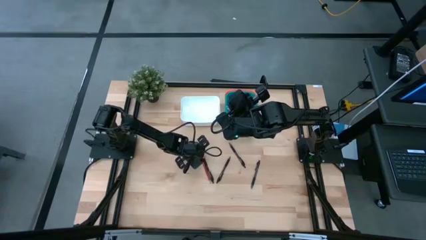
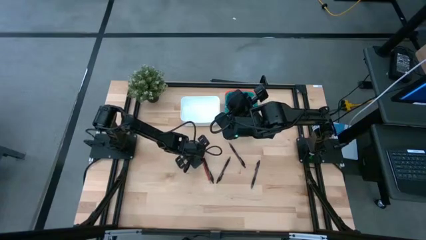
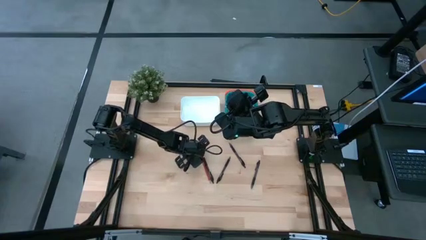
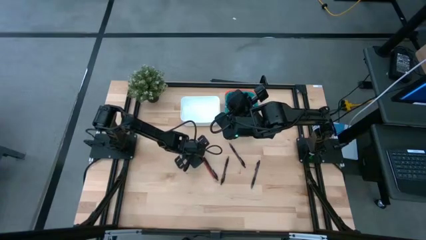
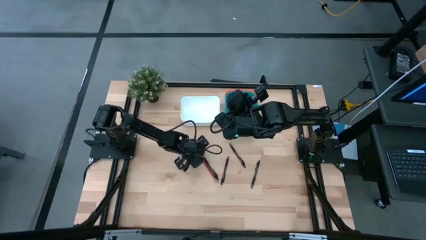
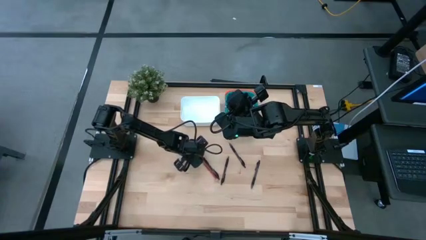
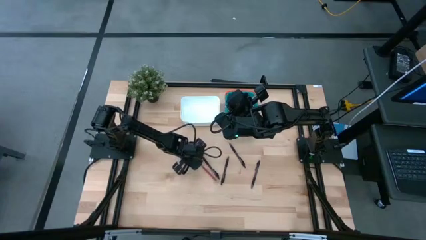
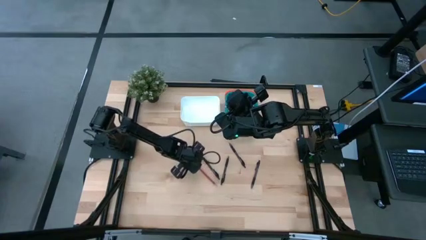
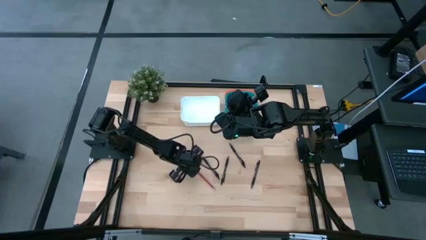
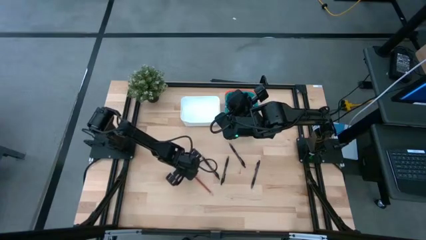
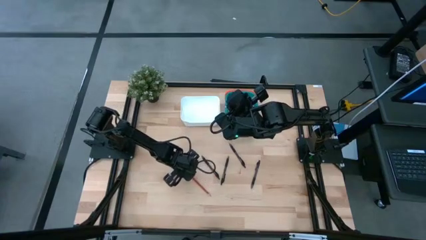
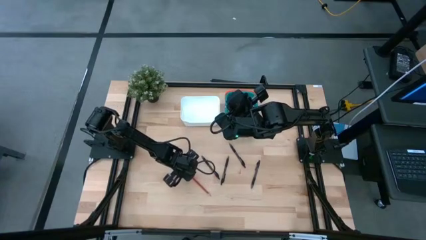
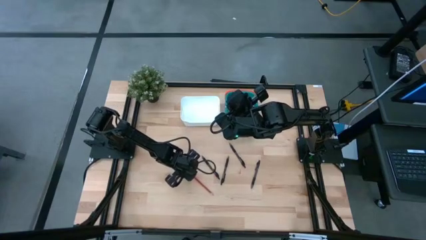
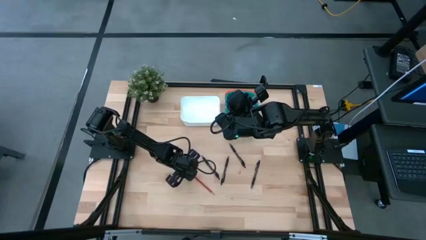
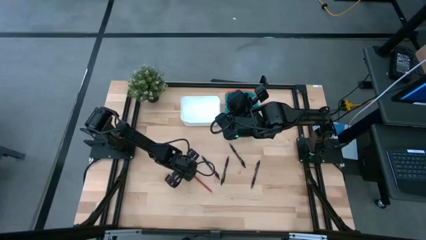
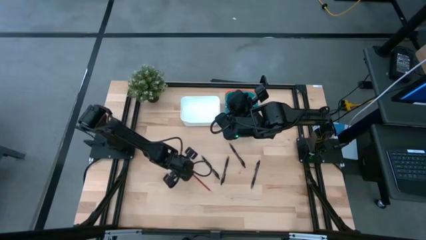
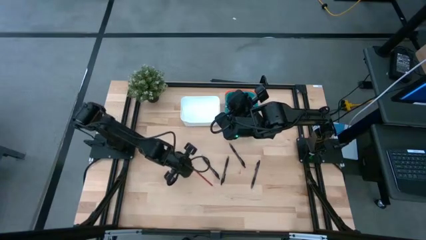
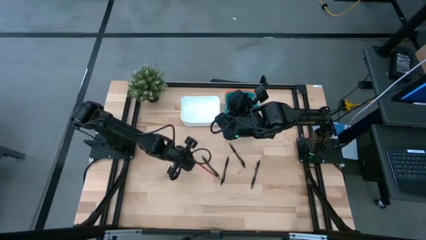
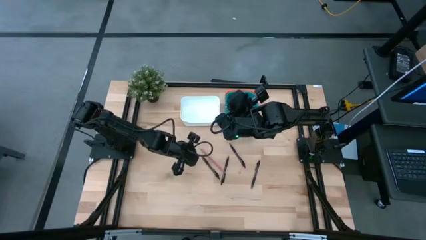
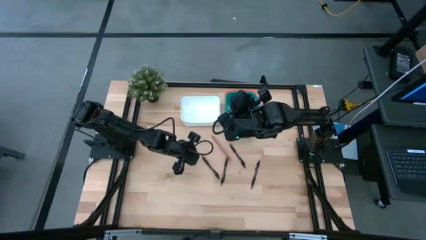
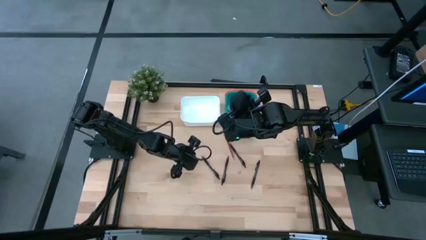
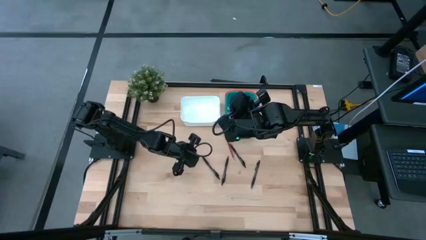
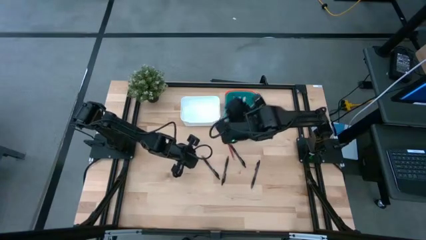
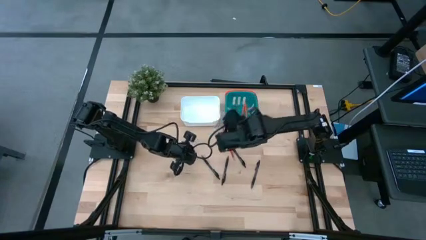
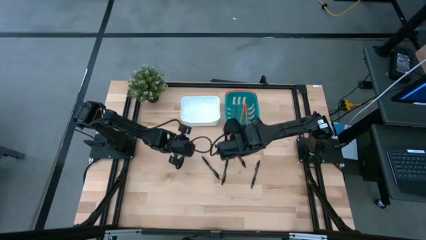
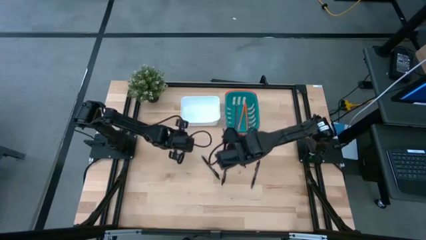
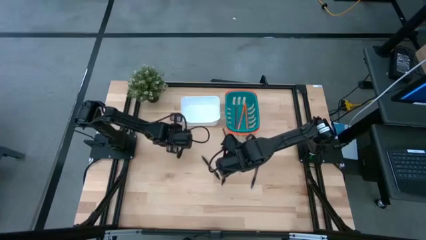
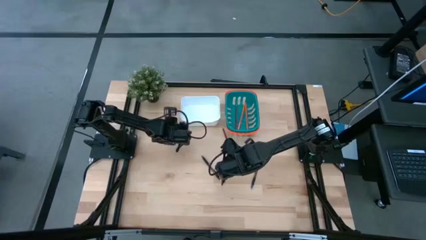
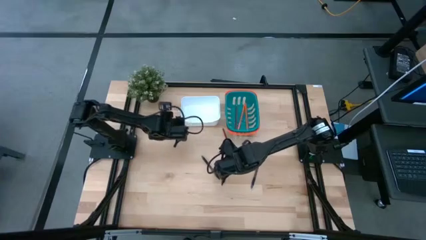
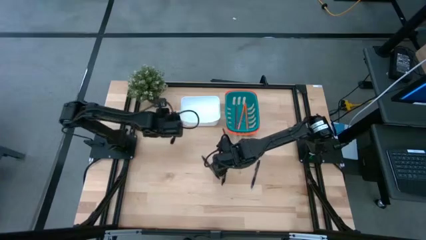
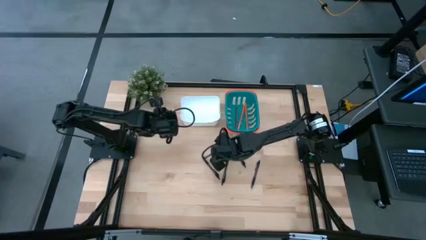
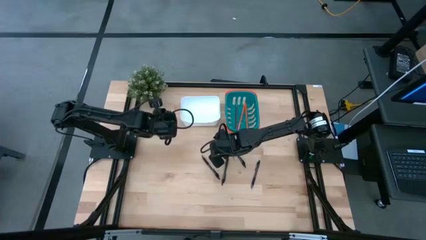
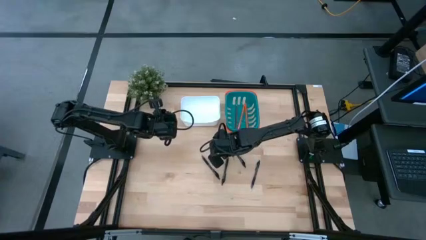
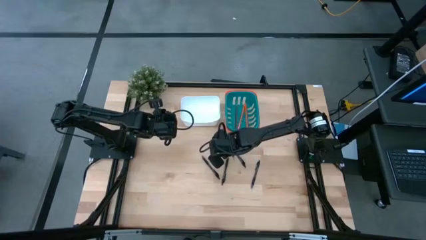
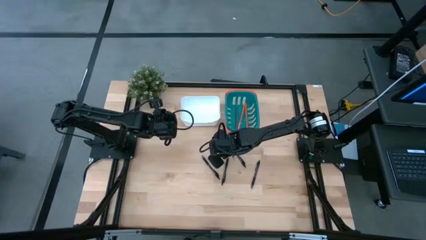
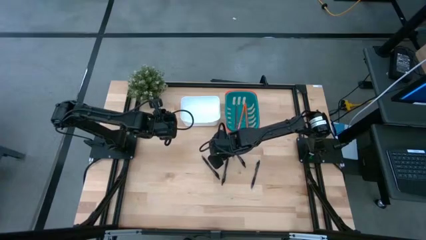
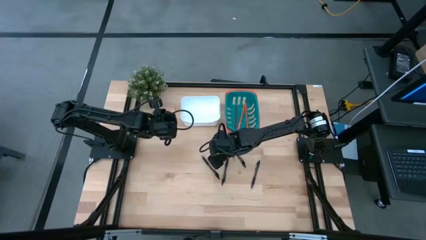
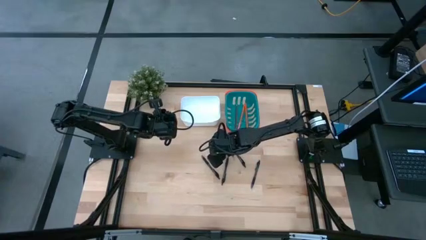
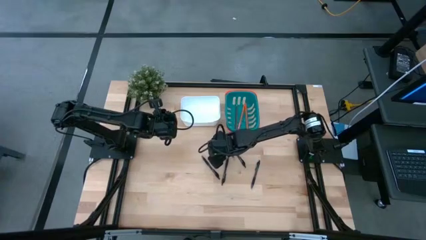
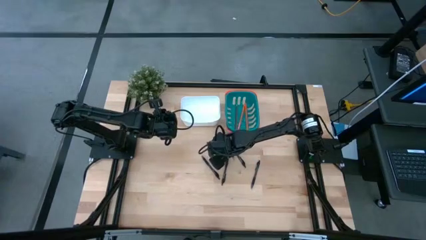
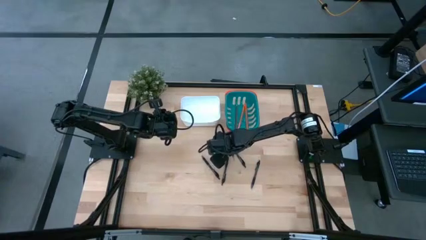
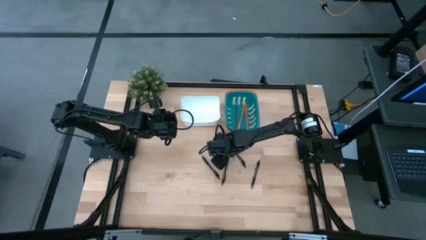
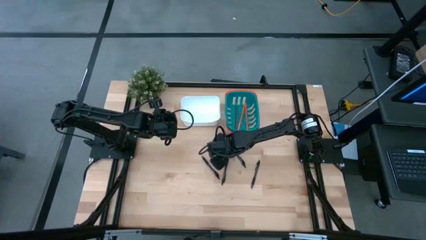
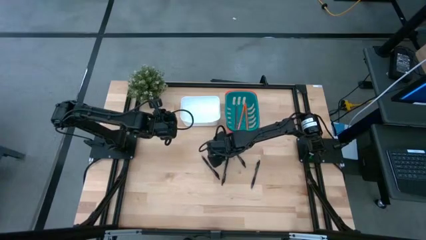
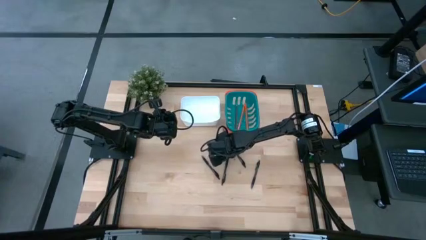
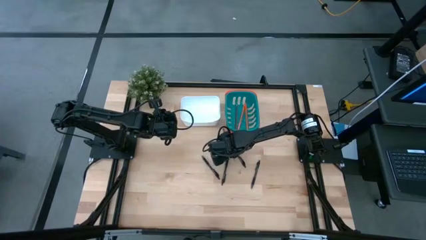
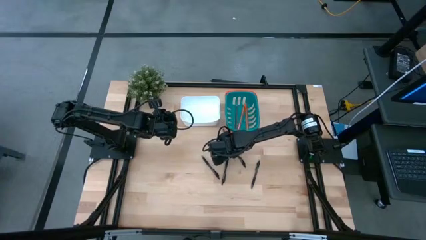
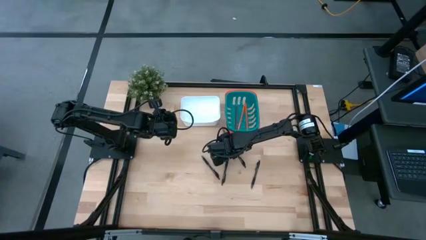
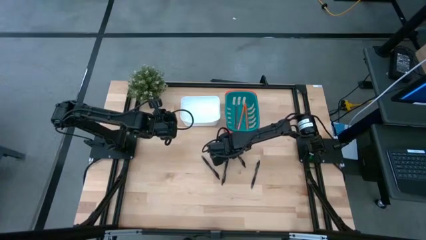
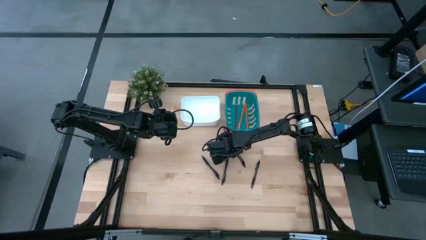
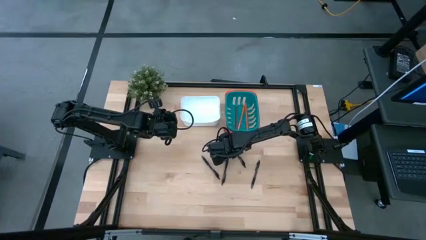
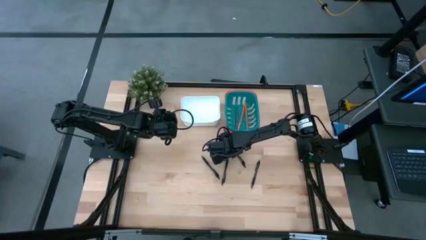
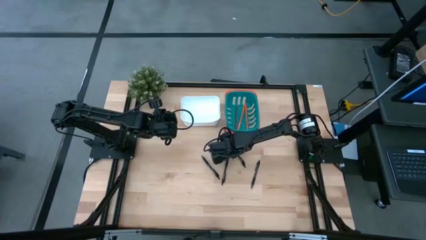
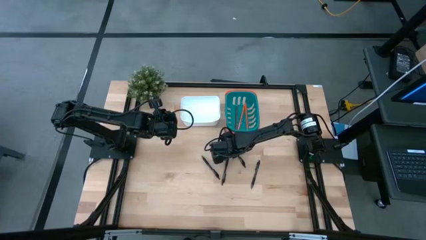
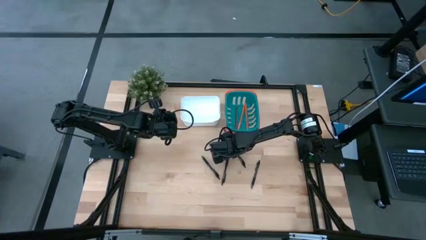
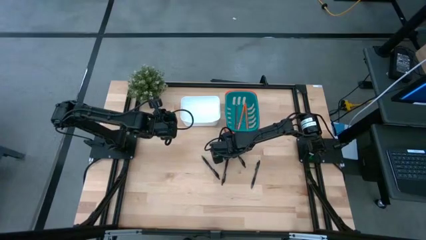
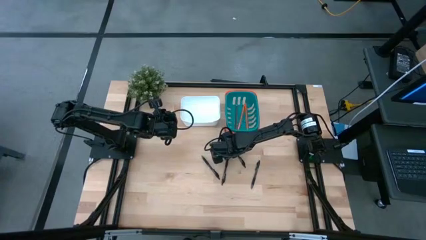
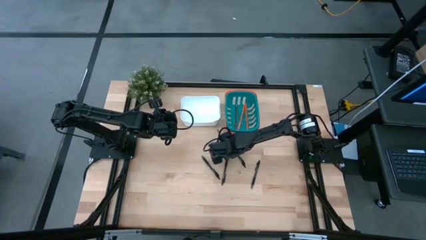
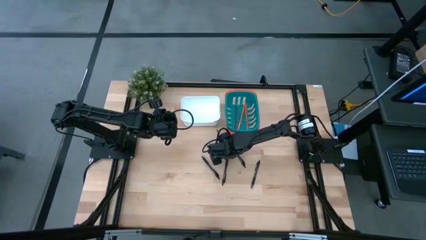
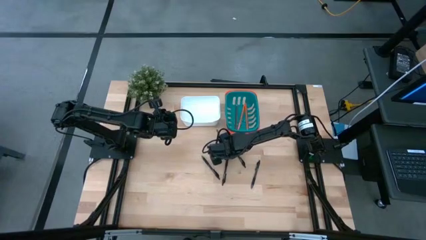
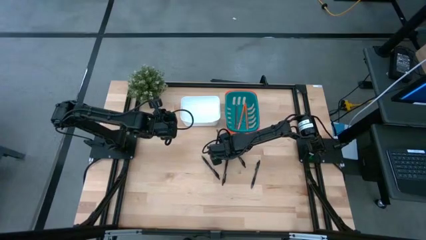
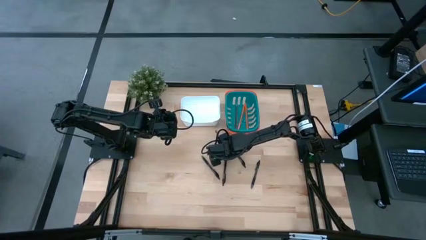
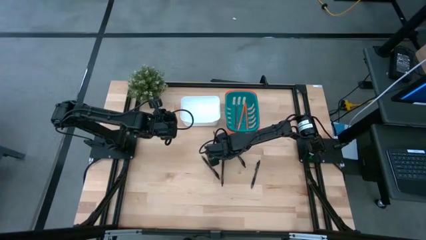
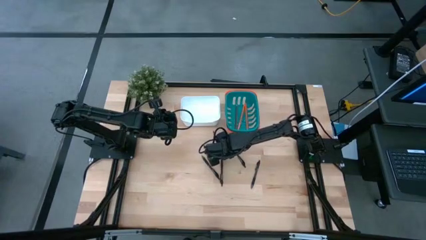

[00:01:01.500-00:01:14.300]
Task: Sort pens & pencils
Put the red pencil into the blue bin

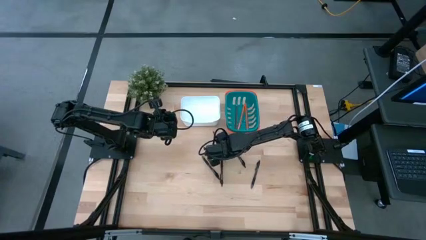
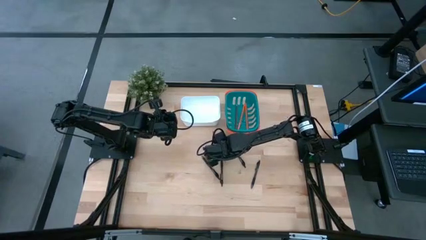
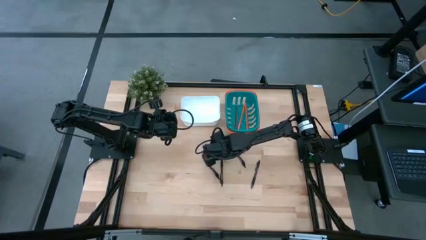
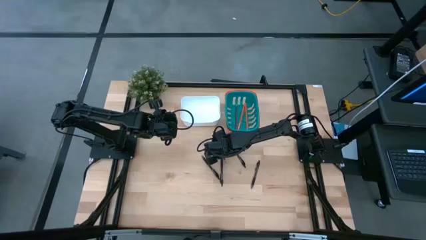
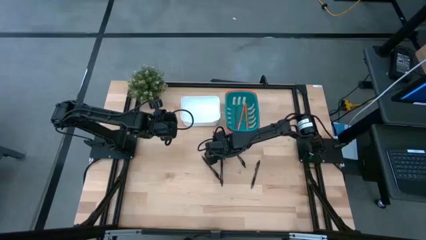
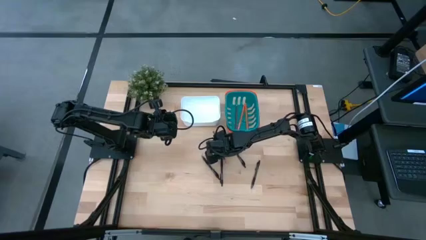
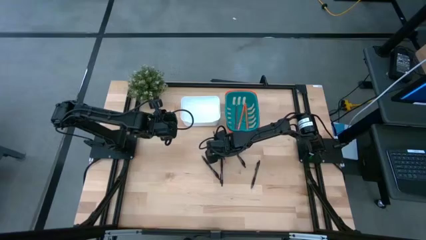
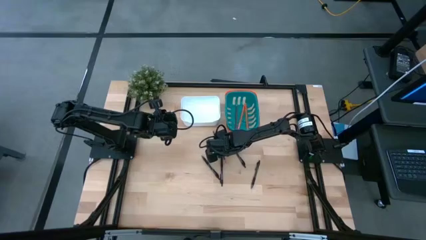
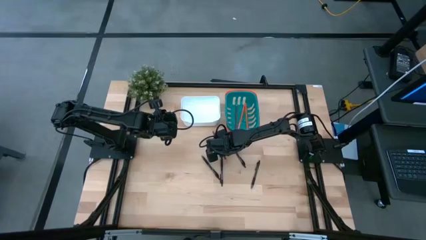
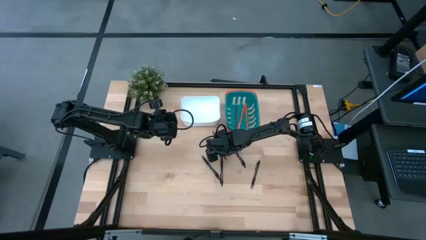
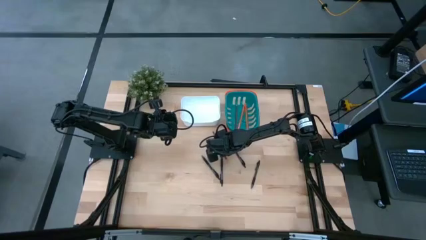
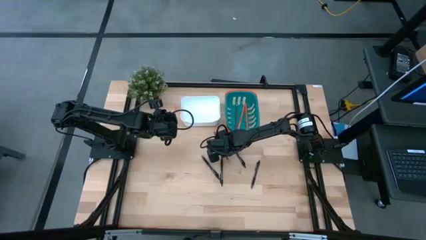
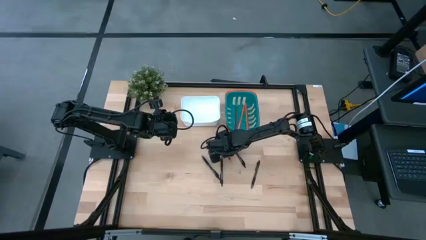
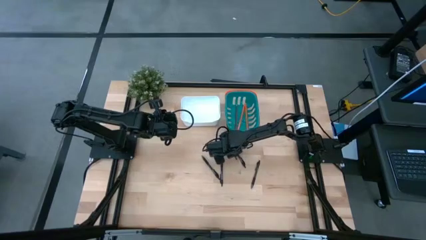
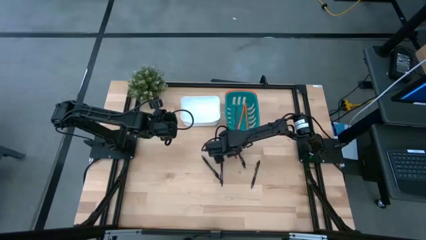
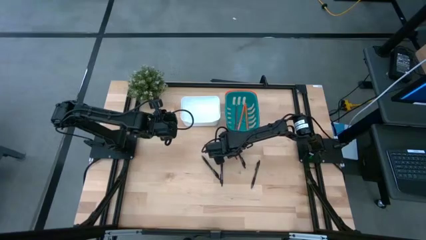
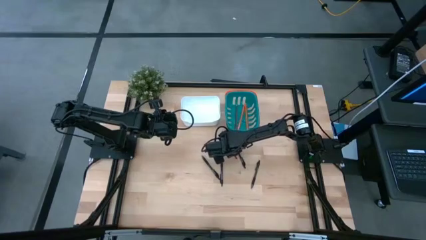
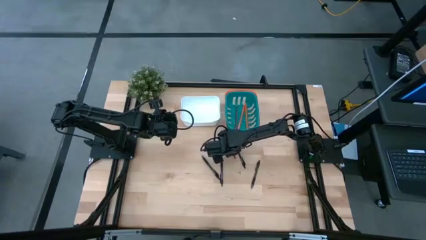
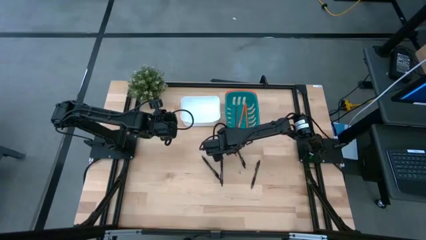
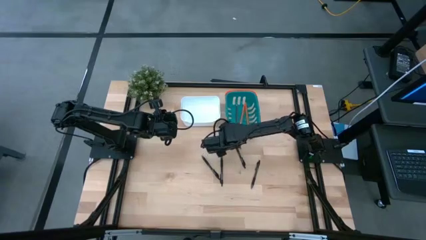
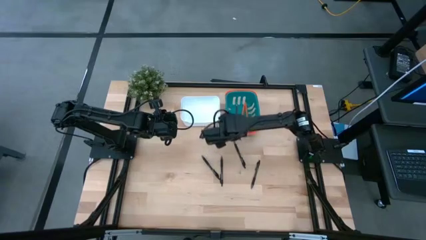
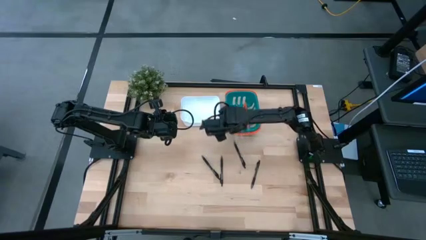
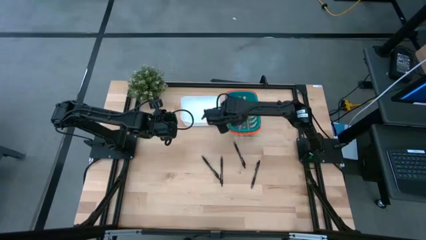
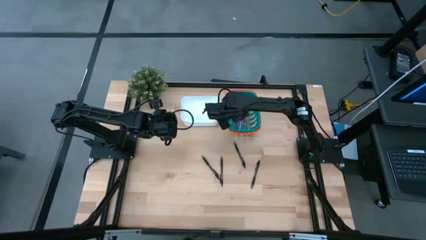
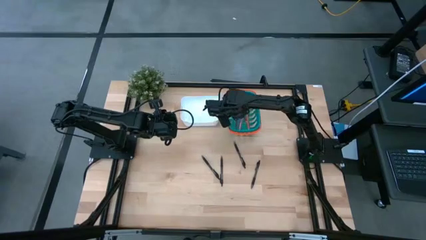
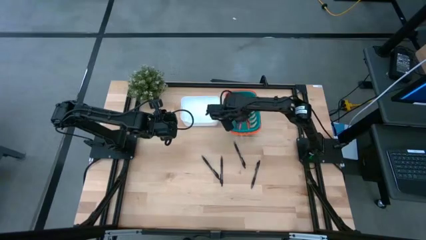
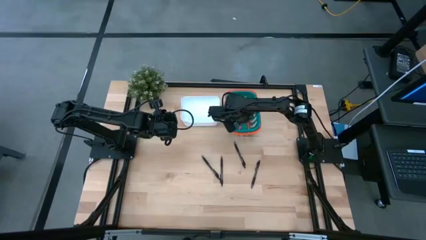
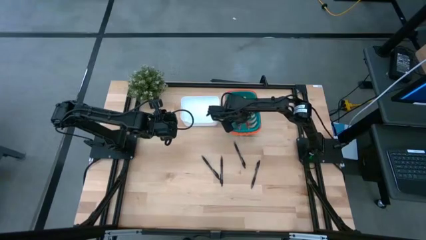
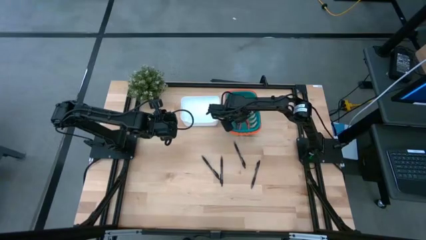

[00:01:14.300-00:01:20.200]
Put the red pencil into the blue bin
